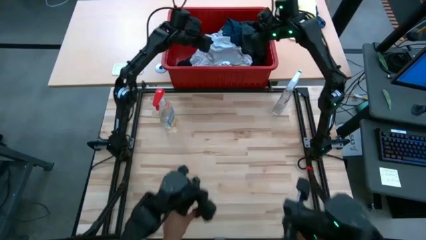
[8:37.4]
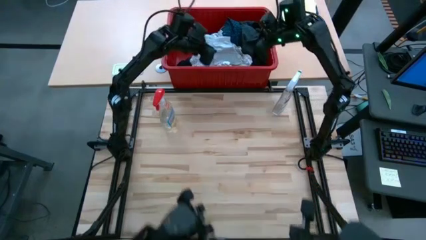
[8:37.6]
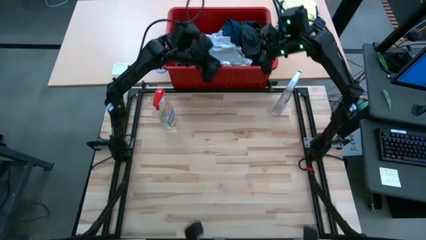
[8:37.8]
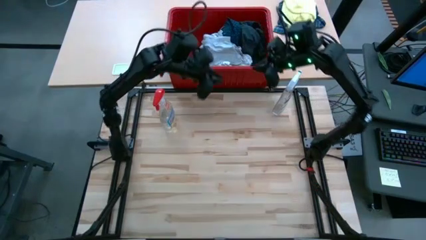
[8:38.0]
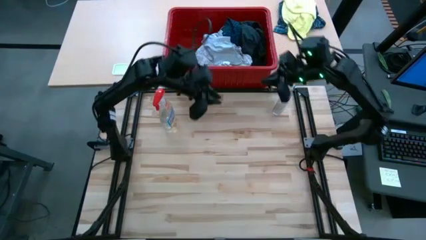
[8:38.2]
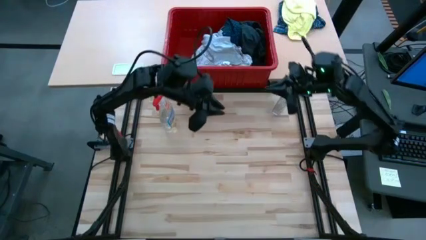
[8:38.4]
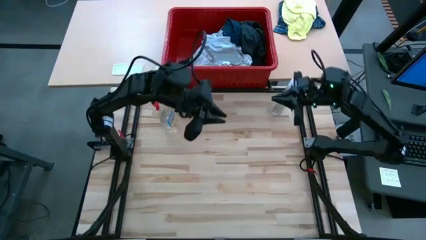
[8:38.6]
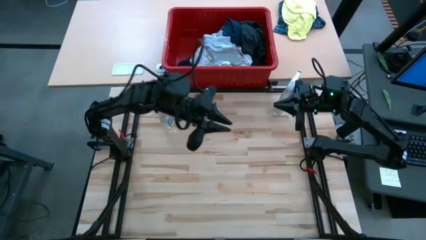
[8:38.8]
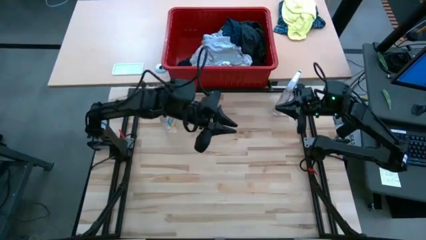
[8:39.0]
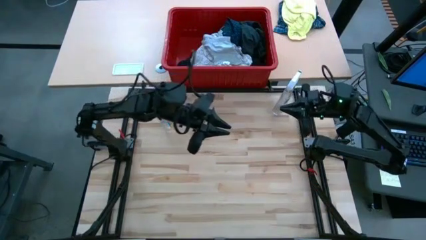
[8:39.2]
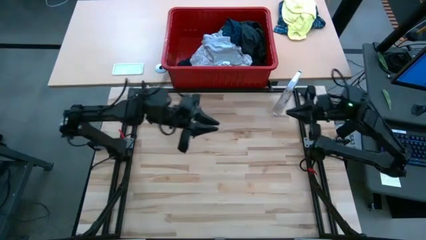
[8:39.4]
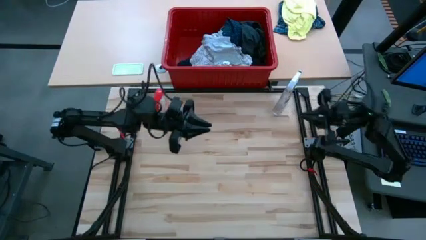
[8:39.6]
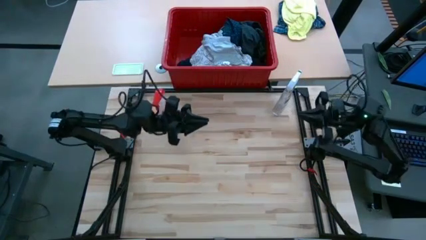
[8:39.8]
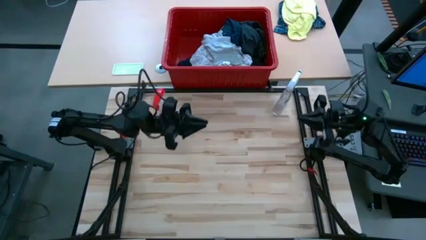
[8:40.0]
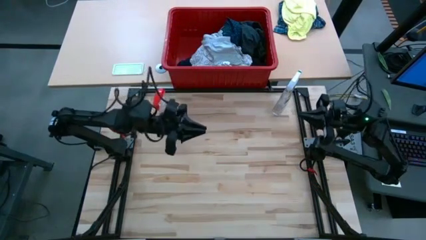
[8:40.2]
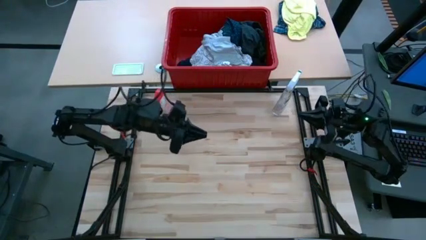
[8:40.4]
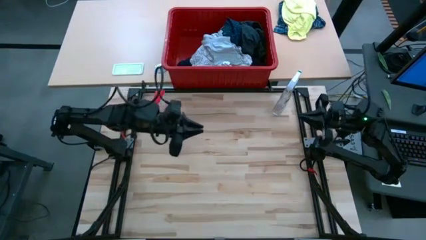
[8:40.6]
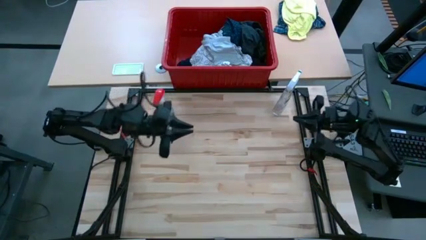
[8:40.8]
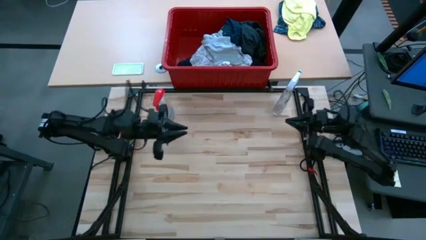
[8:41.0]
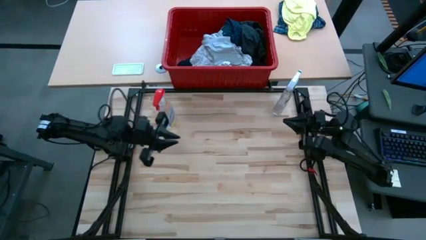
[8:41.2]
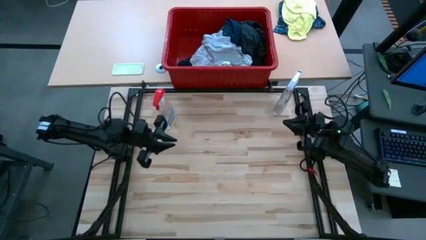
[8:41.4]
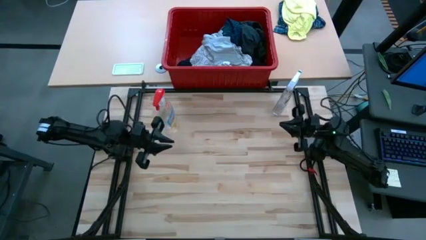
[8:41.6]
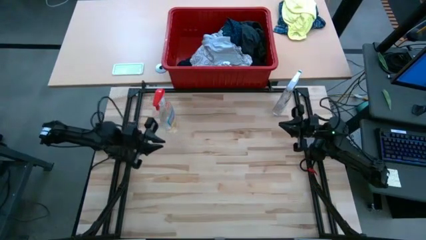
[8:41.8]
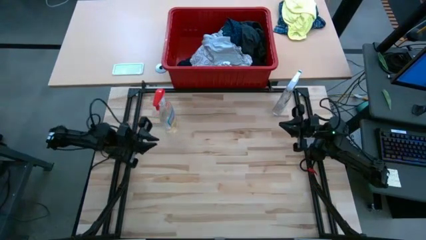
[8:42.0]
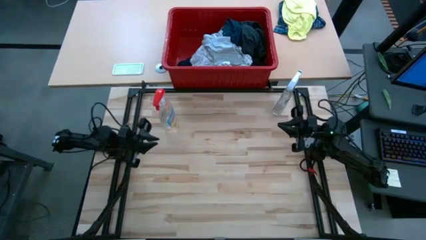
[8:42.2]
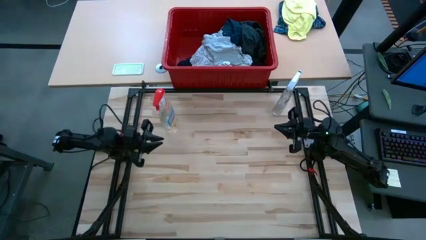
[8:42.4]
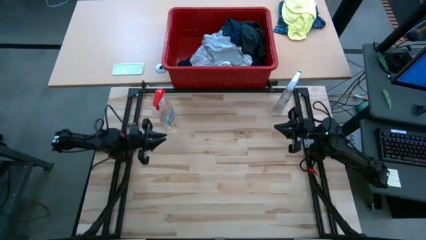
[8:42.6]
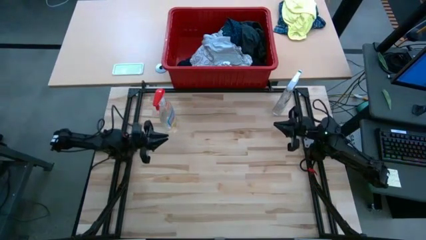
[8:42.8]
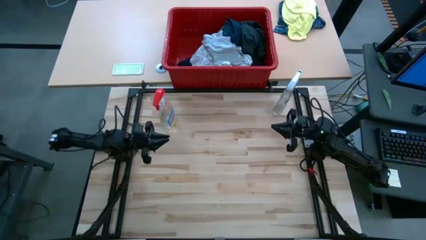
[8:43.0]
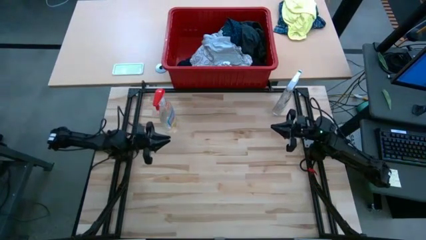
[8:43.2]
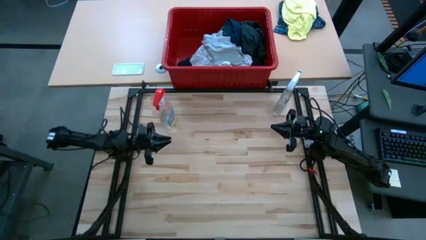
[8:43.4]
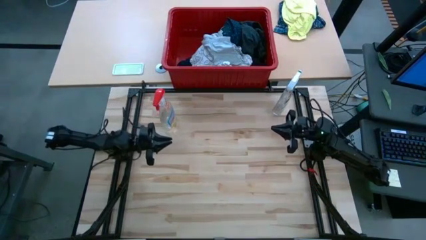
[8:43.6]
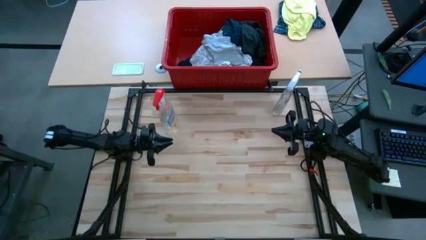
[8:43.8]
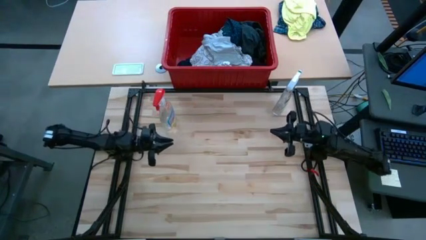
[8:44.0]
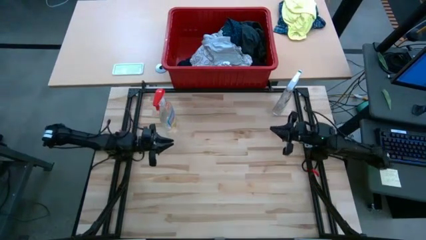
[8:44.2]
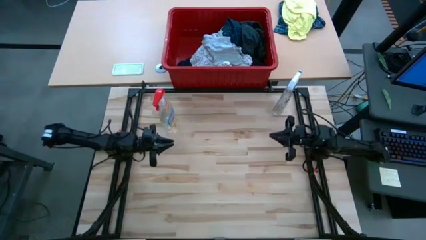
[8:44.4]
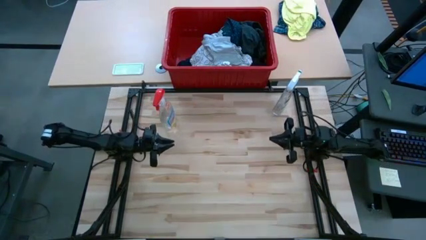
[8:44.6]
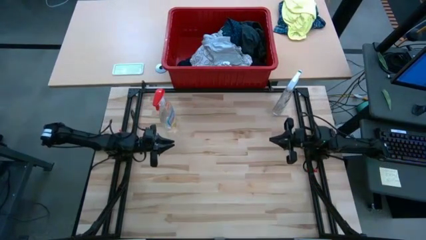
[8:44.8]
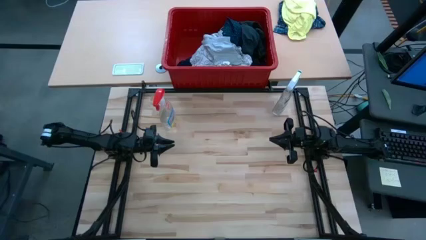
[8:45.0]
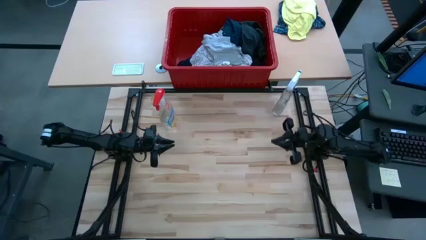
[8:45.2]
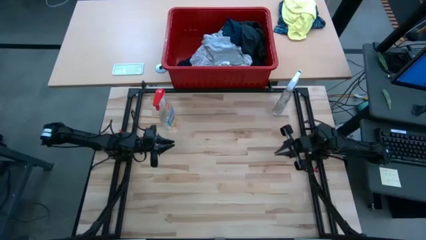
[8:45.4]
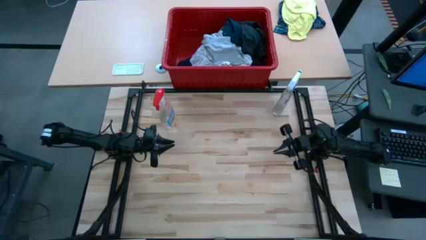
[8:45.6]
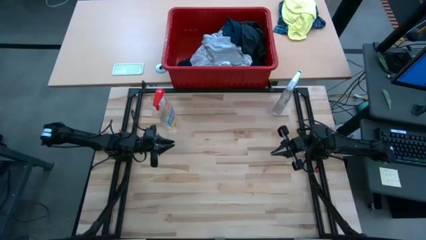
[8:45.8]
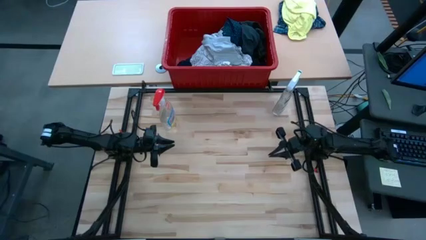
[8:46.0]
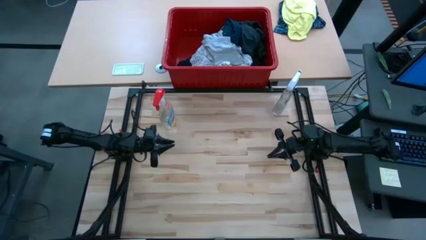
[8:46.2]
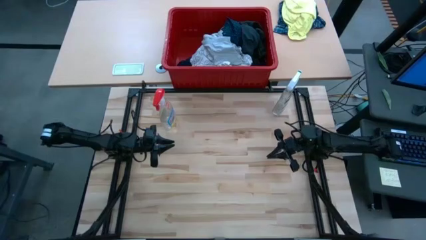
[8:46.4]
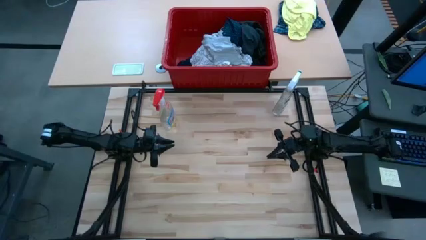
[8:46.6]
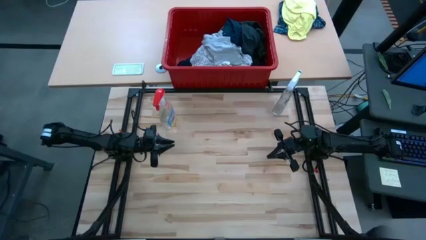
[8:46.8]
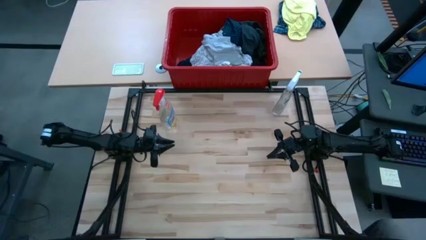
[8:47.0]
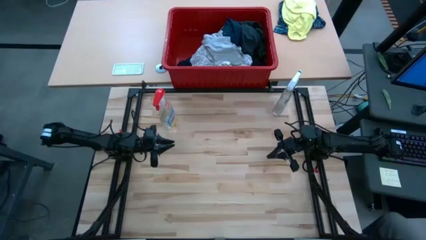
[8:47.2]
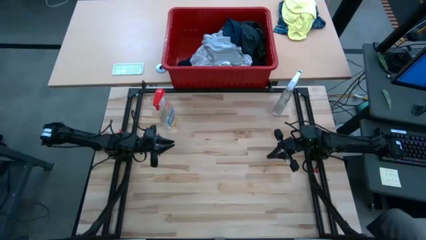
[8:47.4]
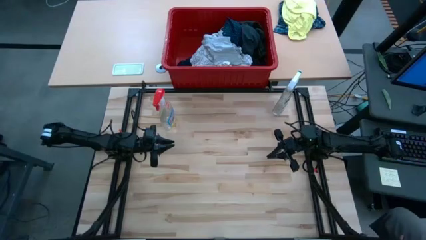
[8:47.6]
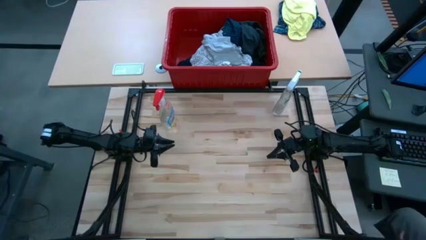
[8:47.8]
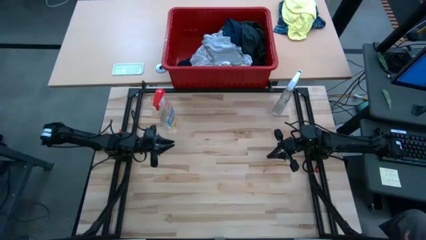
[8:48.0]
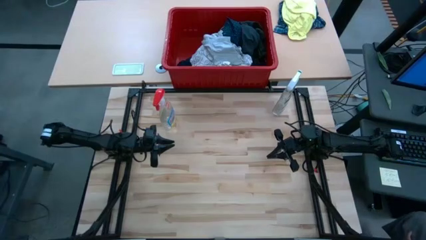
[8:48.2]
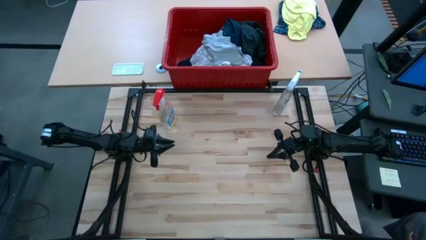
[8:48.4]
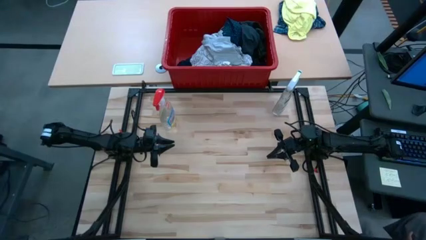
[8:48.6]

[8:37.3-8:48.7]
Task: Fold Laundry from Bin
Return to Home Position
